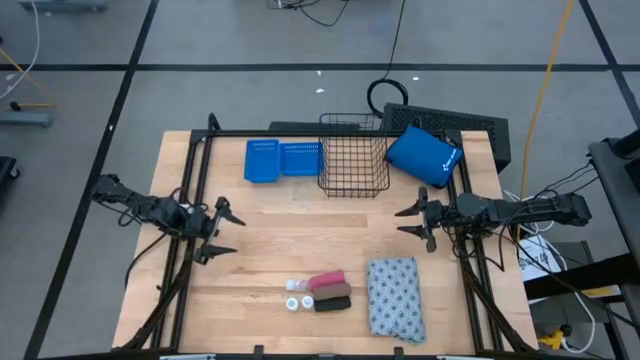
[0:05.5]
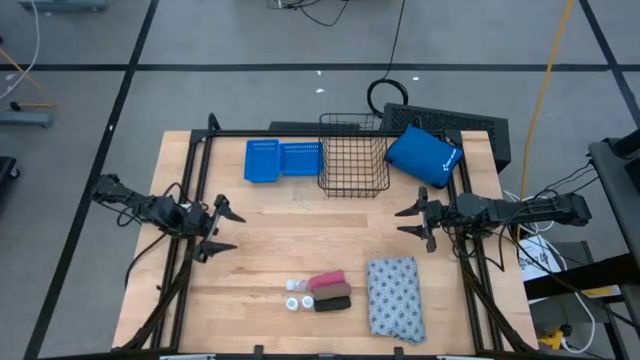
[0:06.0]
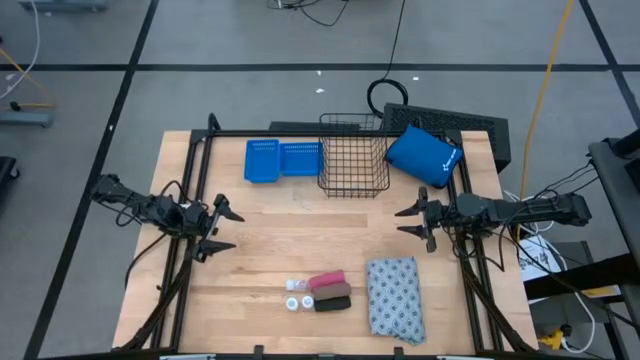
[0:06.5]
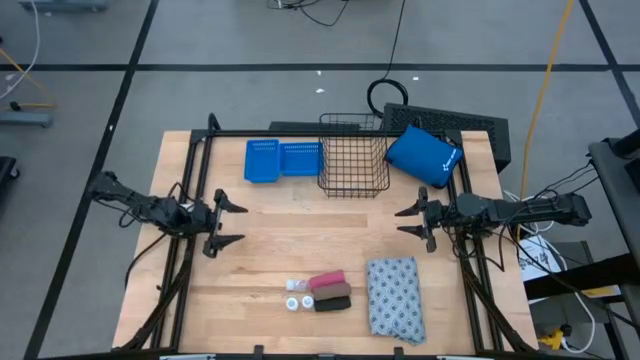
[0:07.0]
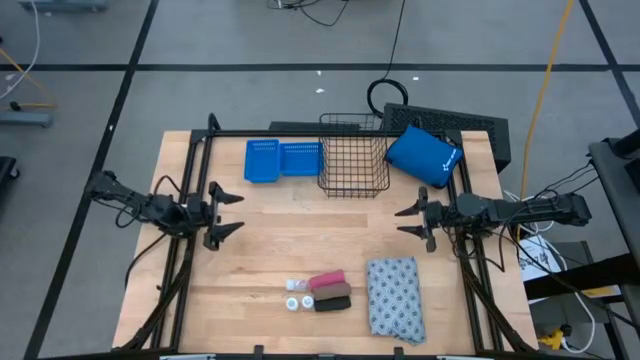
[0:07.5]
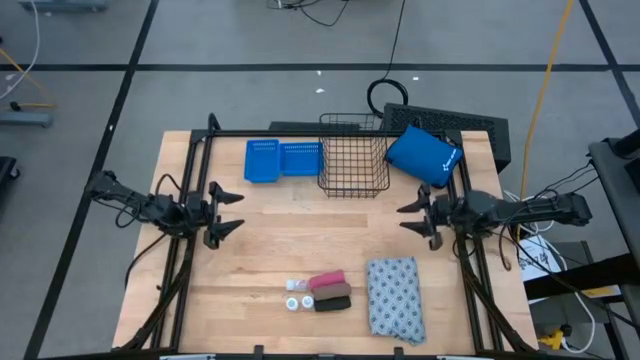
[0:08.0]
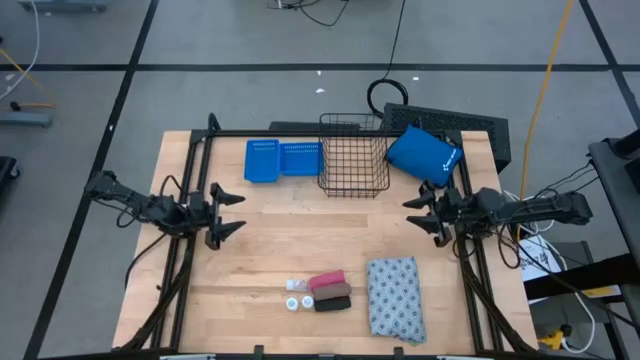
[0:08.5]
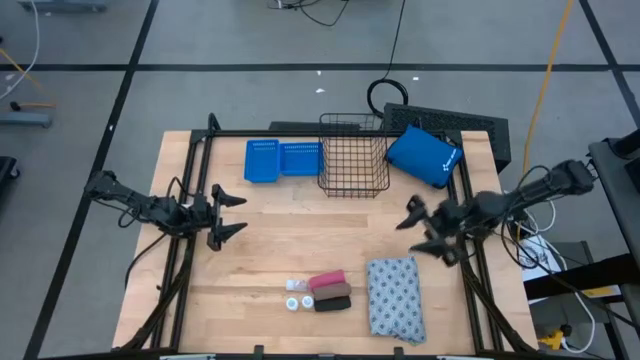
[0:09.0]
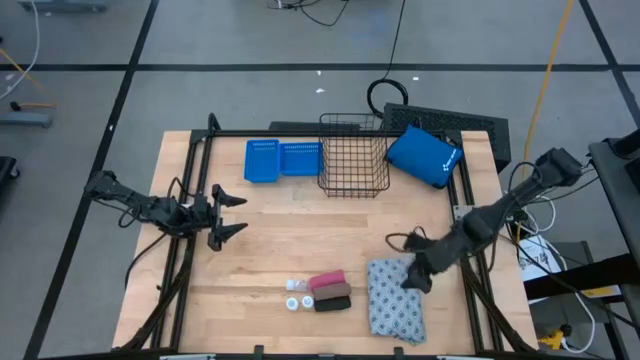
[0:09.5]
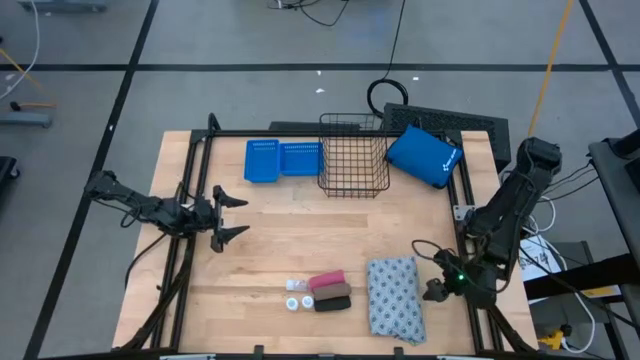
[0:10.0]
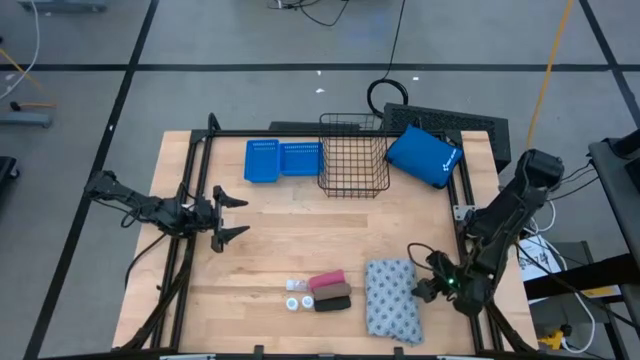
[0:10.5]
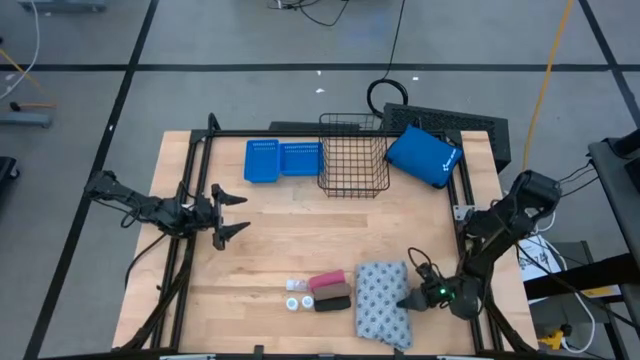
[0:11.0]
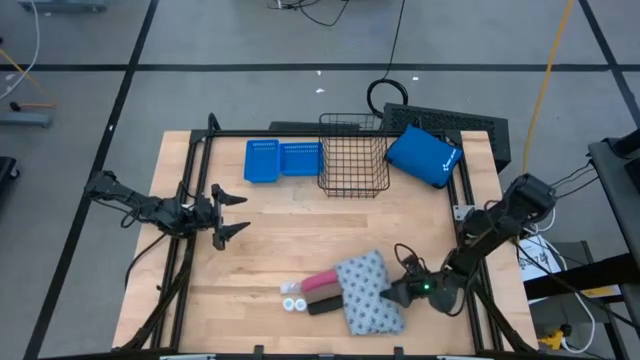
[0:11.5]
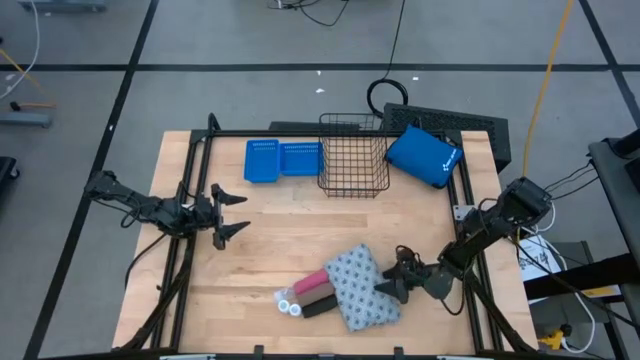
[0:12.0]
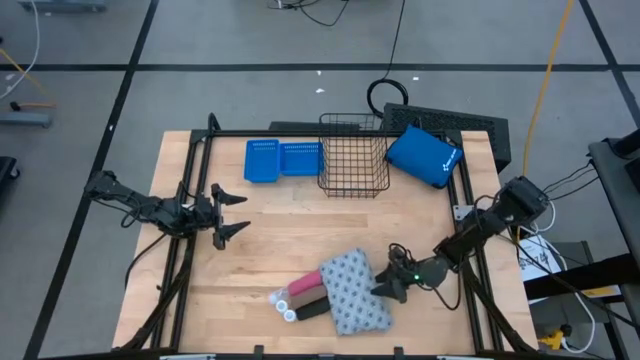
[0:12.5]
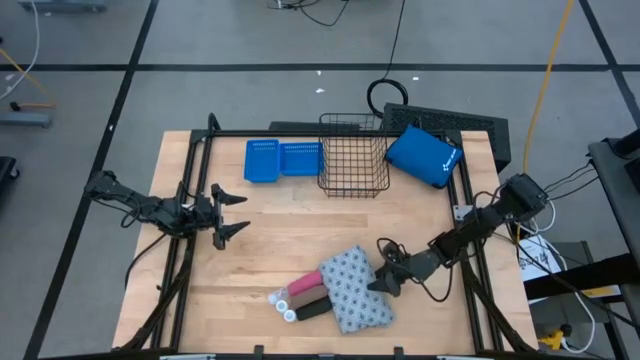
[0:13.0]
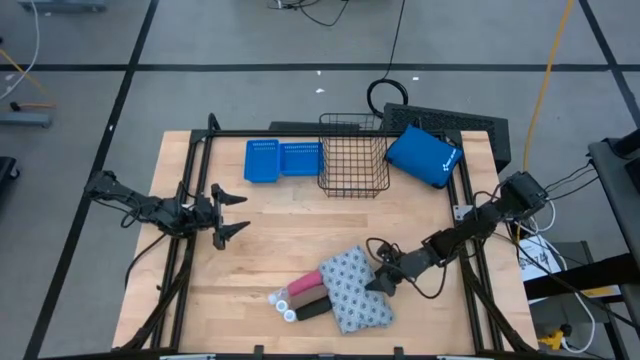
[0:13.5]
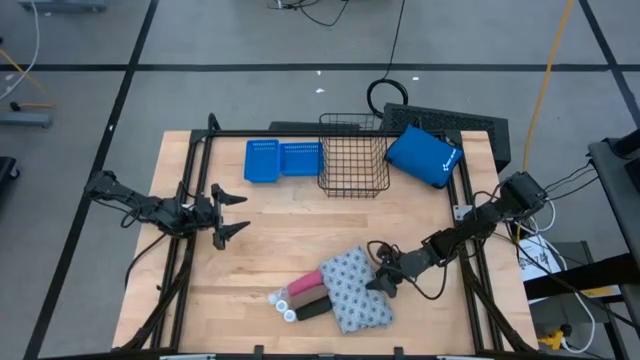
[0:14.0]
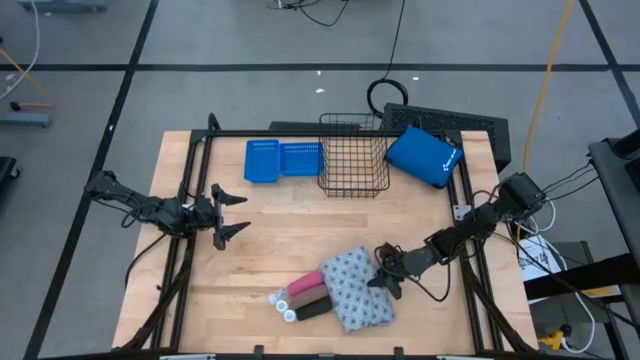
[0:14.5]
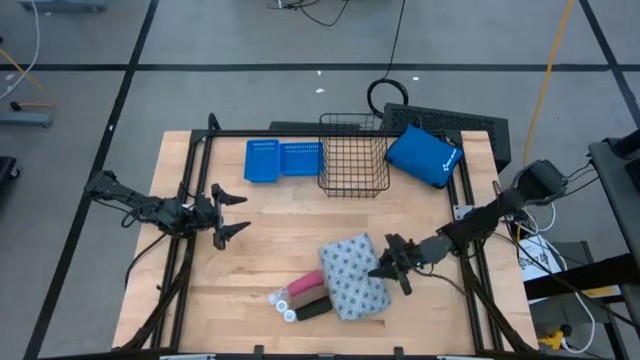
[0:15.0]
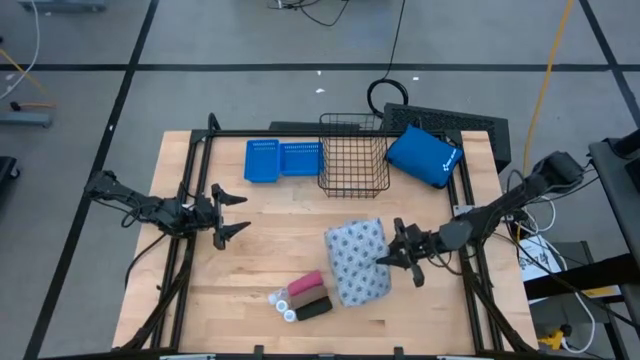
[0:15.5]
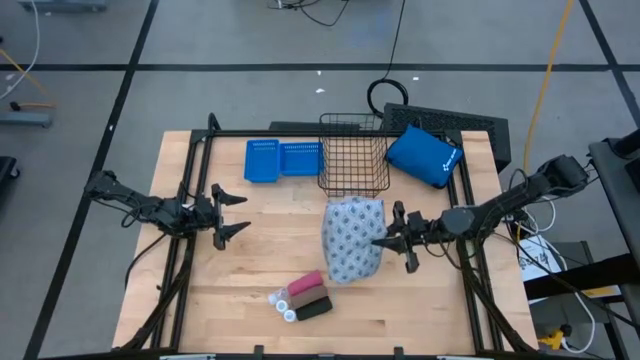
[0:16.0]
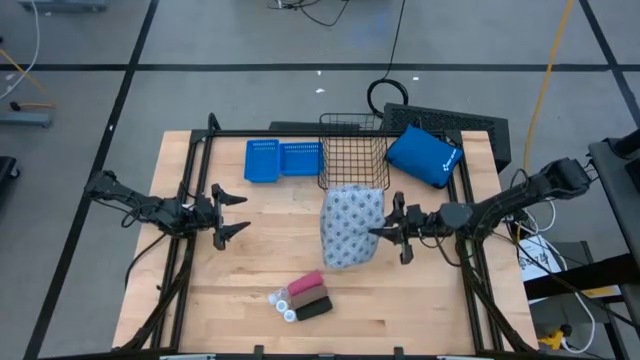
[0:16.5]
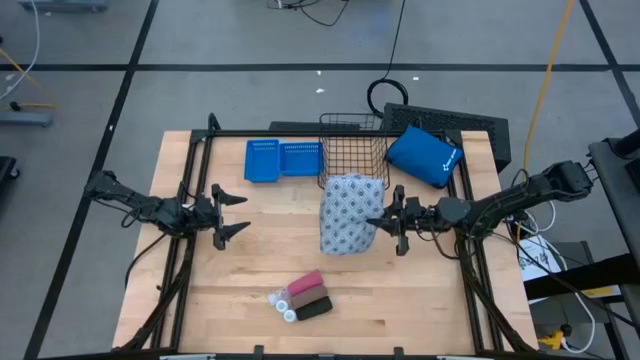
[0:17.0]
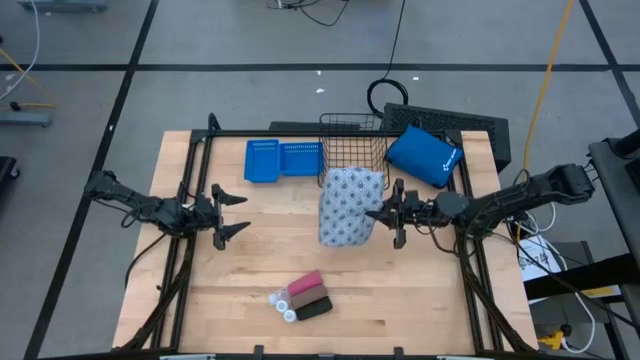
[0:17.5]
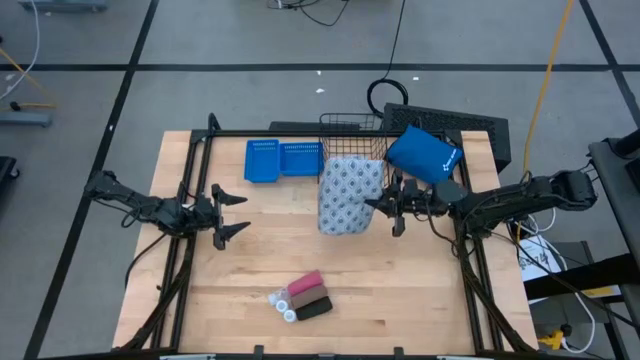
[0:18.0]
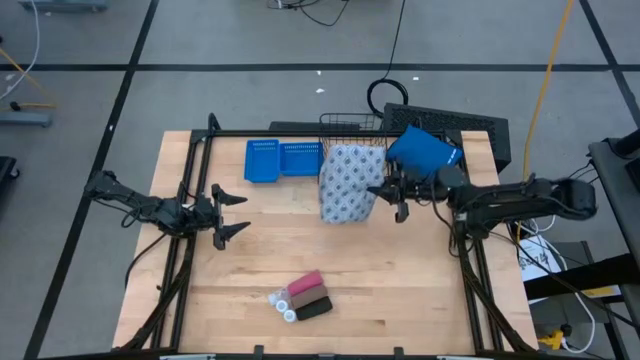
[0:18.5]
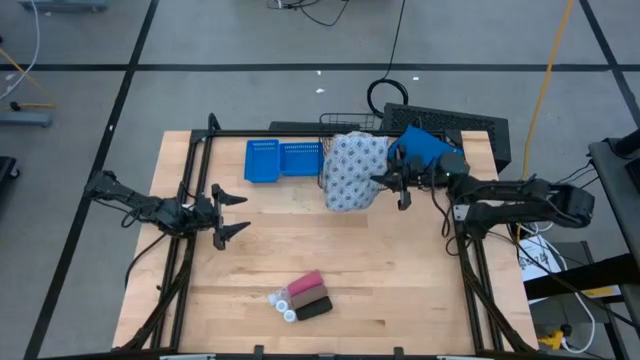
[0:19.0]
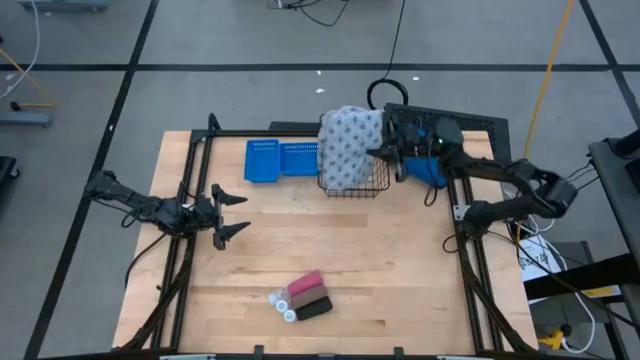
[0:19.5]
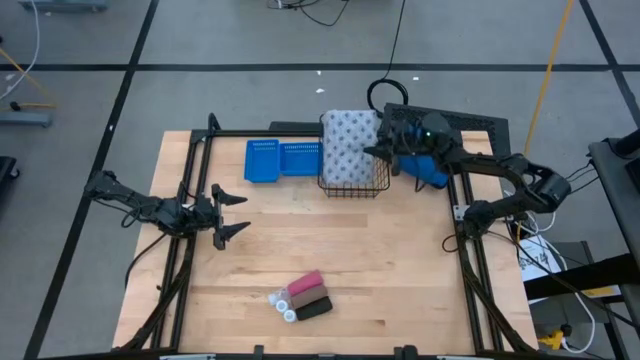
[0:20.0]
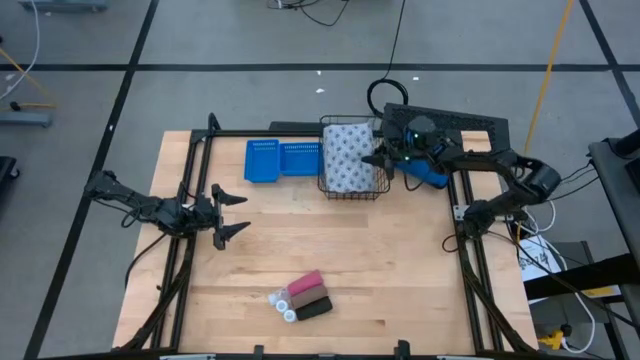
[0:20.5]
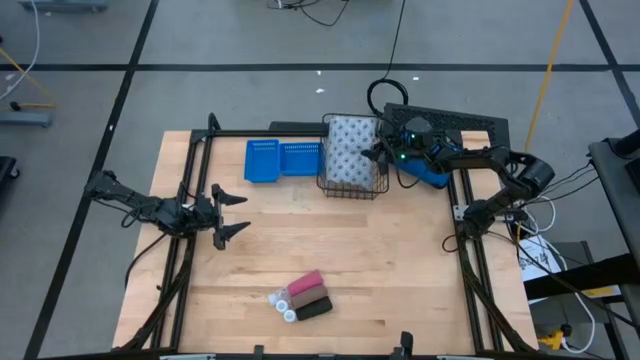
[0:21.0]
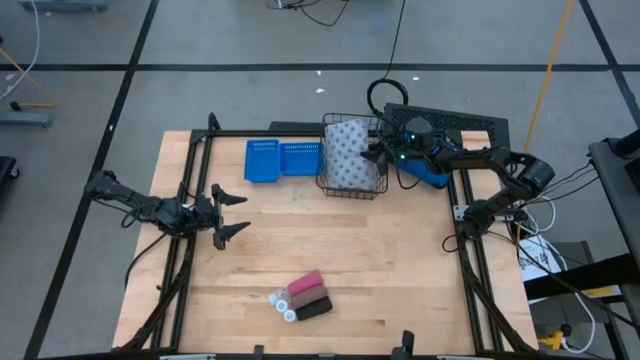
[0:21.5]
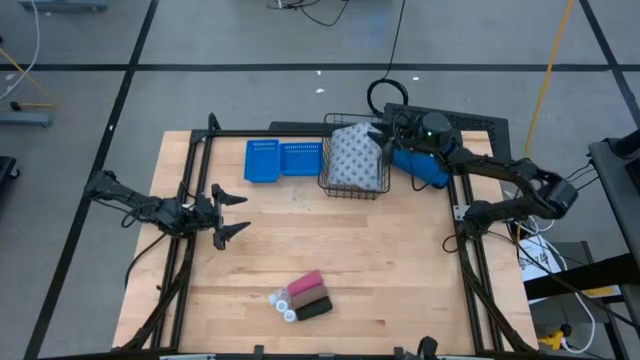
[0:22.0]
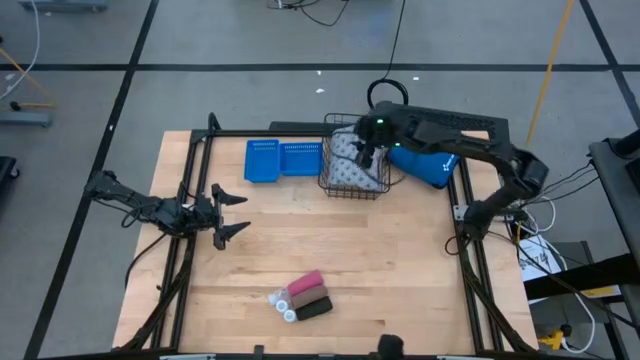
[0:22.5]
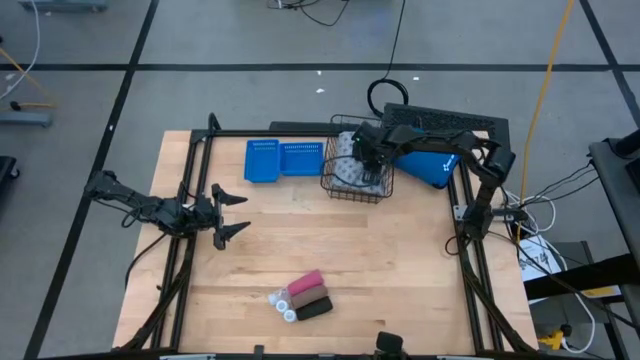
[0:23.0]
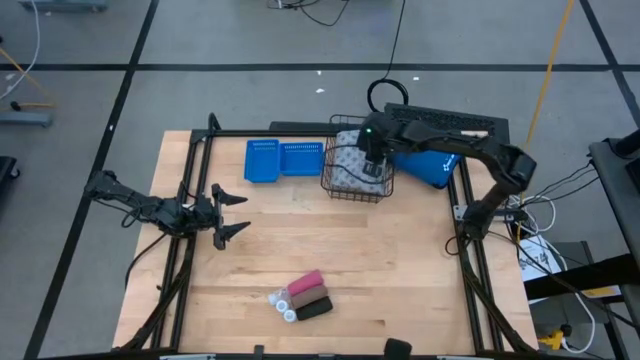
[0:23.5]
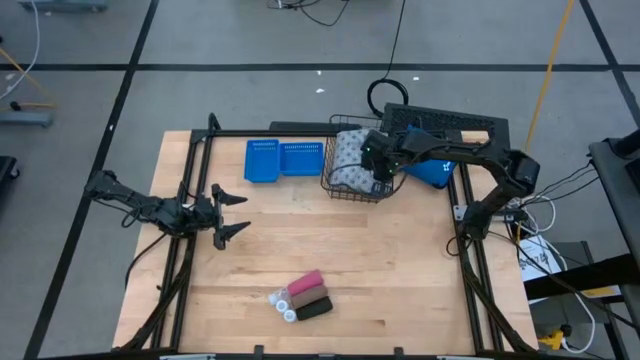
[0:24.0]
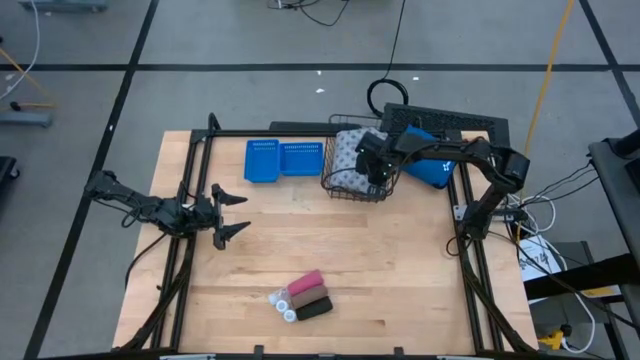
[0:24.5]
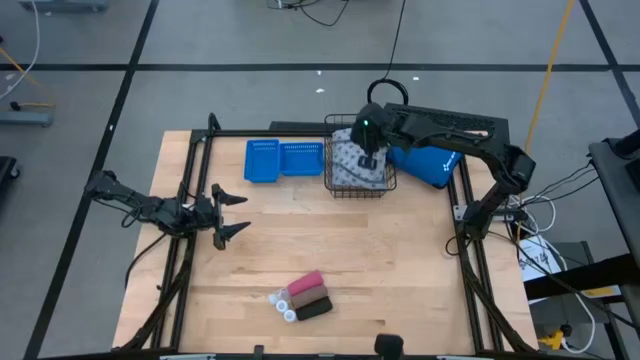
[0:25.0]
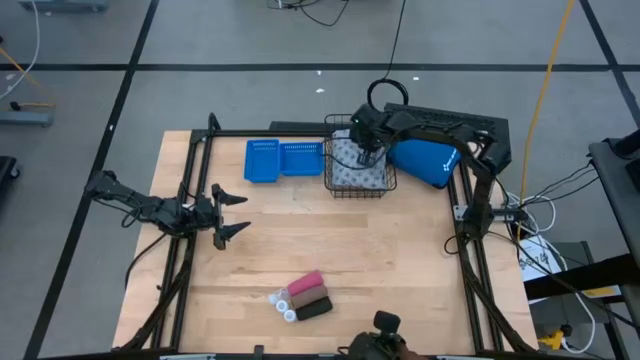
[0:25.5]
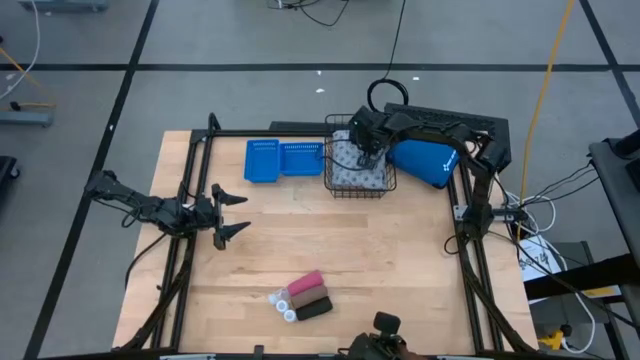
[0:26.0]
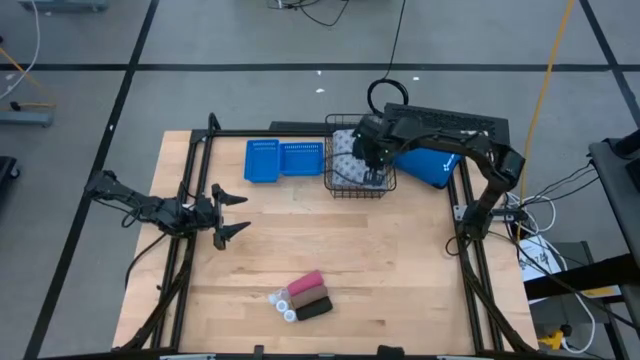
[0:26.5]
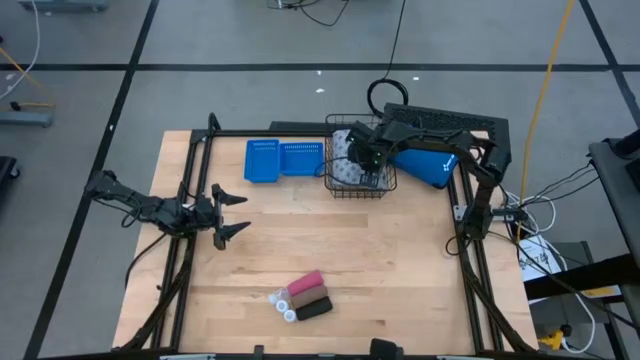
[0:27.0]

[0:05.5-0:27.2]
Task: Pick & Place Medicine items
Put the patient gown into the wire basket

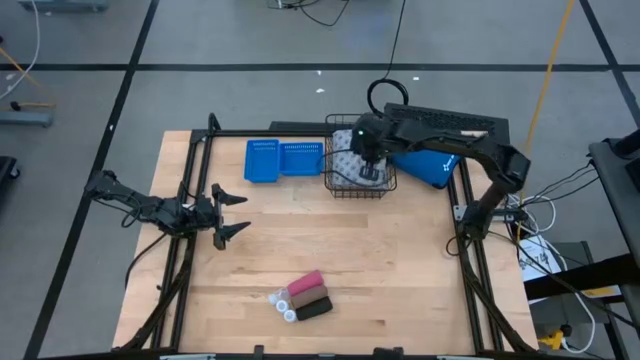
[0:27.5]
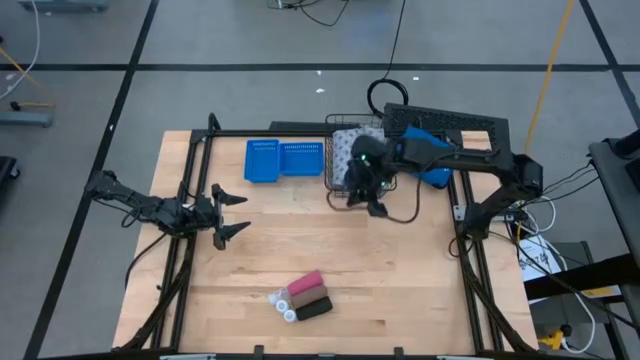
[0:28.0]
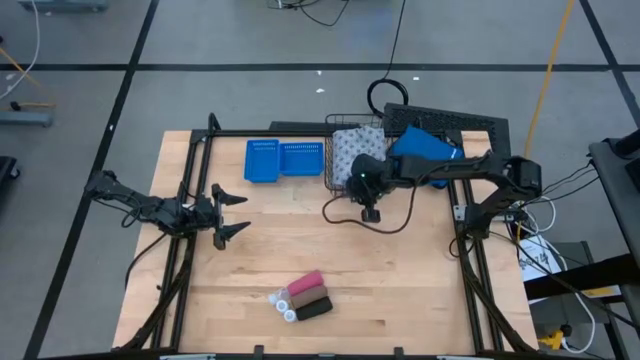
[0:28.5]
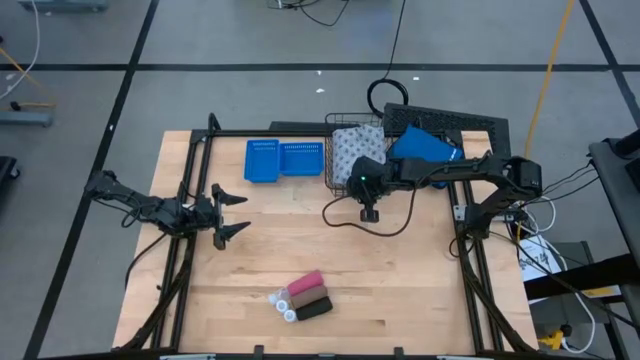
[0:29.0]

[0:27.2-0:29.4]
Adjust the wire basket on the table
